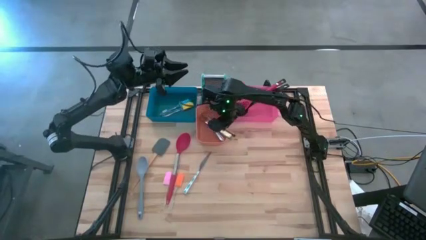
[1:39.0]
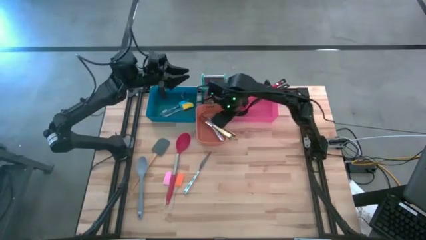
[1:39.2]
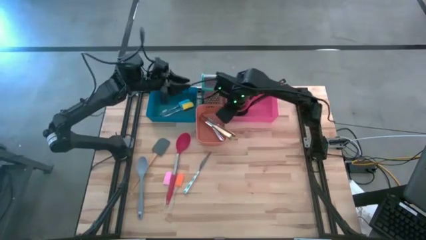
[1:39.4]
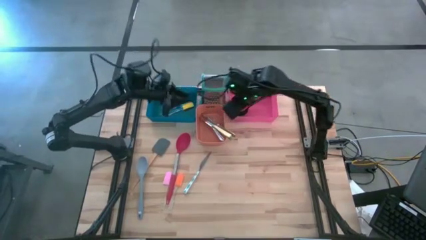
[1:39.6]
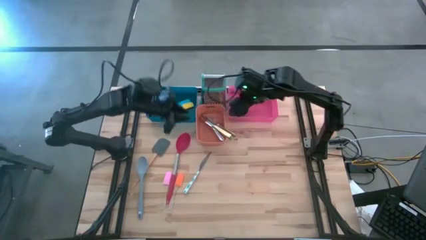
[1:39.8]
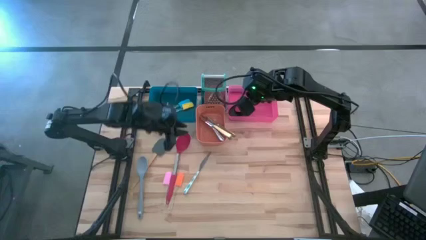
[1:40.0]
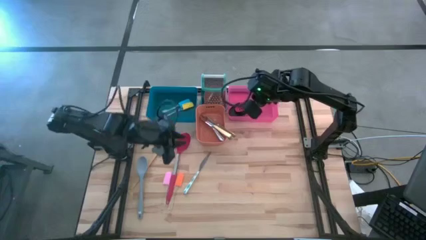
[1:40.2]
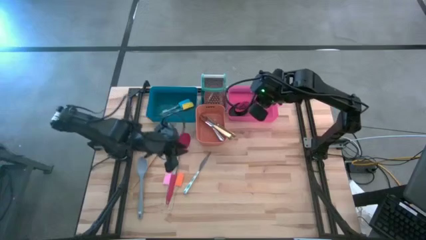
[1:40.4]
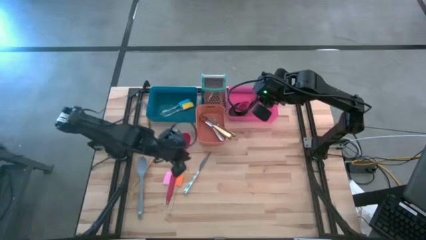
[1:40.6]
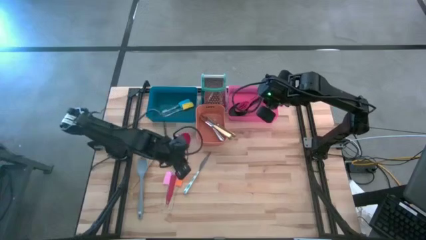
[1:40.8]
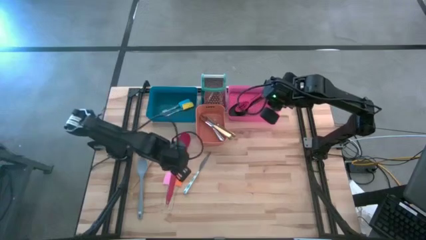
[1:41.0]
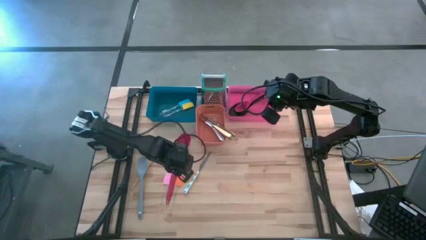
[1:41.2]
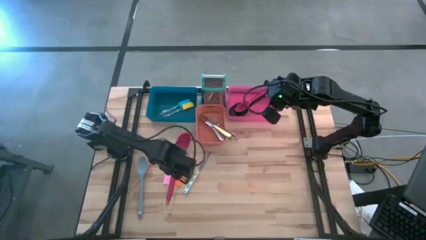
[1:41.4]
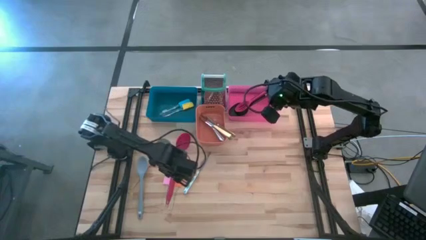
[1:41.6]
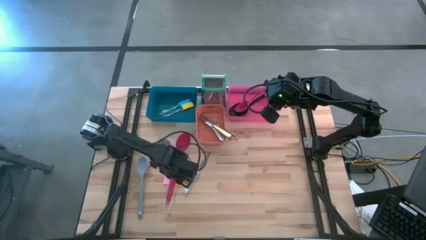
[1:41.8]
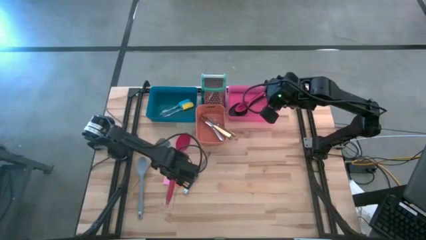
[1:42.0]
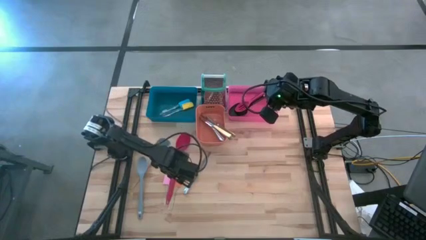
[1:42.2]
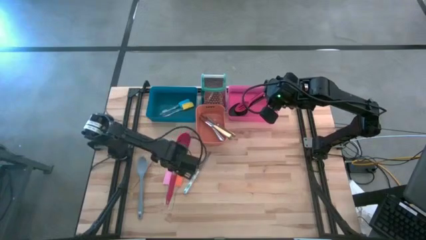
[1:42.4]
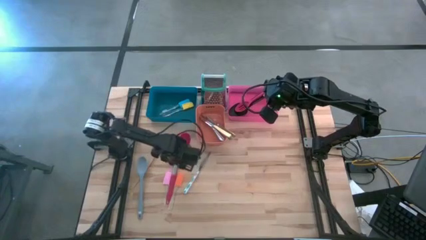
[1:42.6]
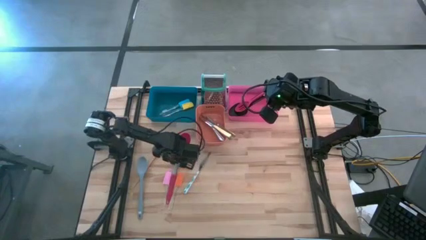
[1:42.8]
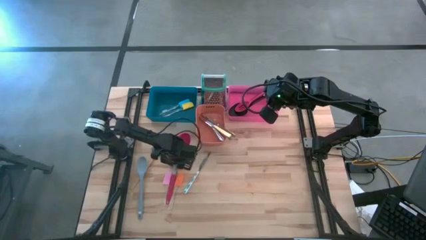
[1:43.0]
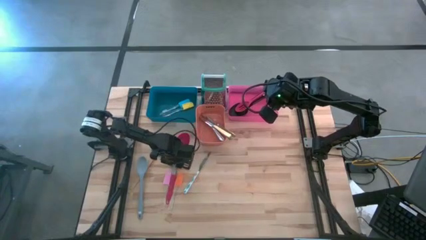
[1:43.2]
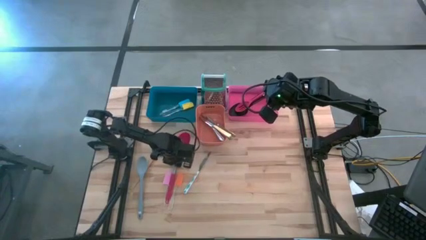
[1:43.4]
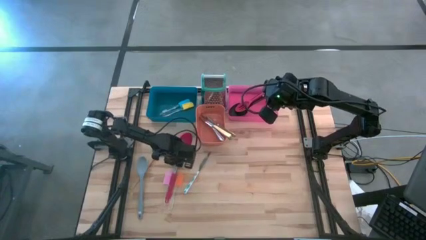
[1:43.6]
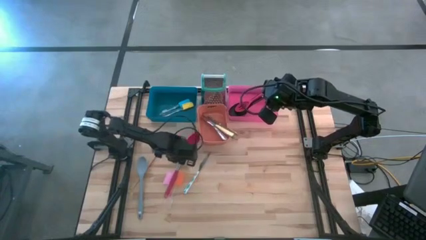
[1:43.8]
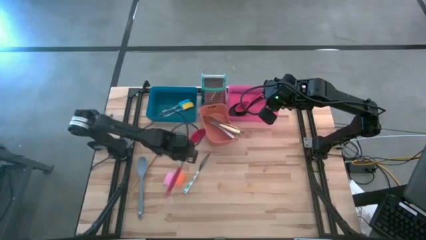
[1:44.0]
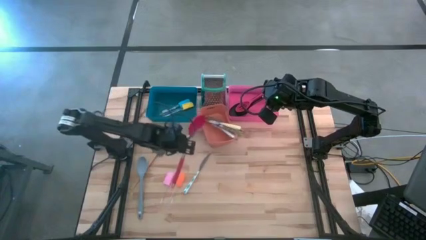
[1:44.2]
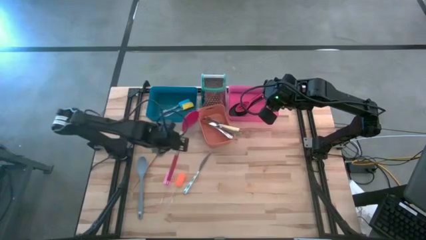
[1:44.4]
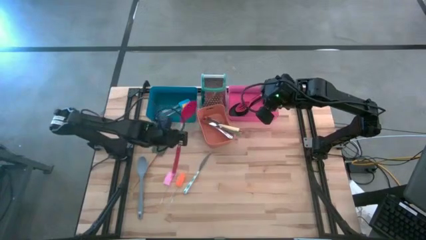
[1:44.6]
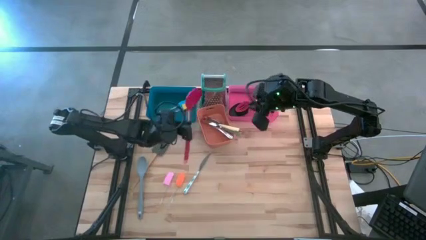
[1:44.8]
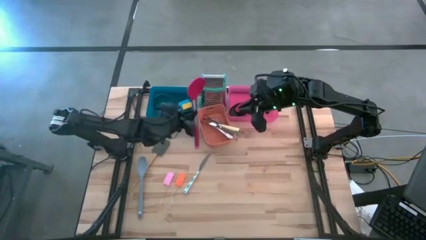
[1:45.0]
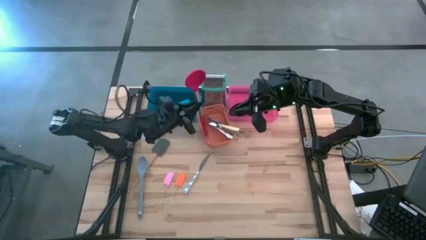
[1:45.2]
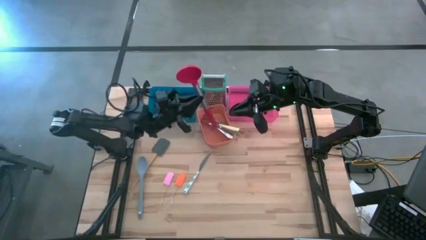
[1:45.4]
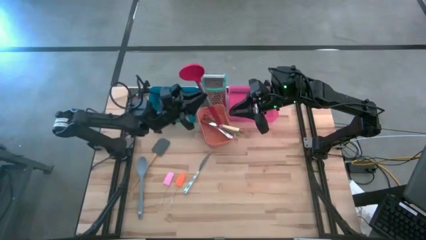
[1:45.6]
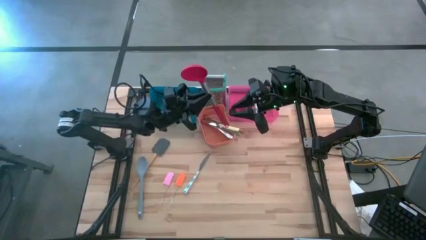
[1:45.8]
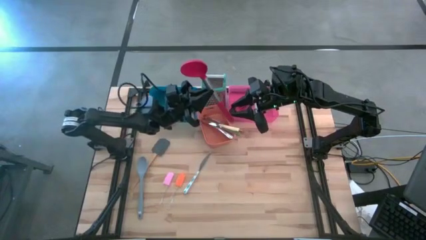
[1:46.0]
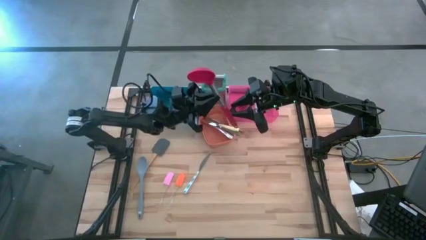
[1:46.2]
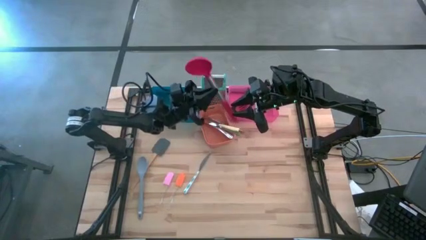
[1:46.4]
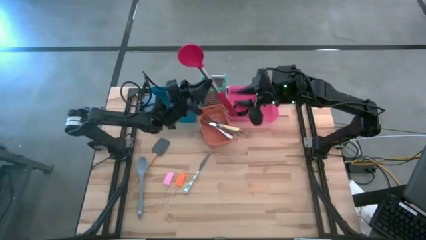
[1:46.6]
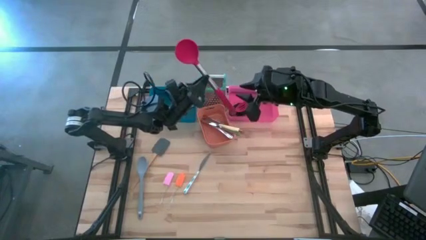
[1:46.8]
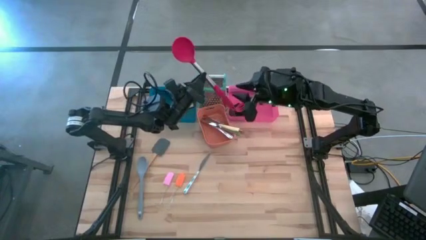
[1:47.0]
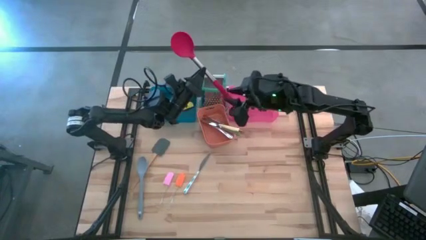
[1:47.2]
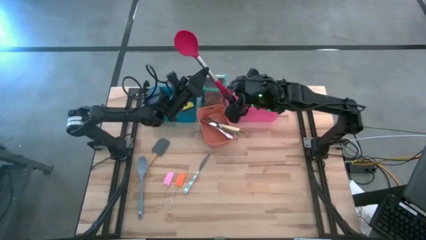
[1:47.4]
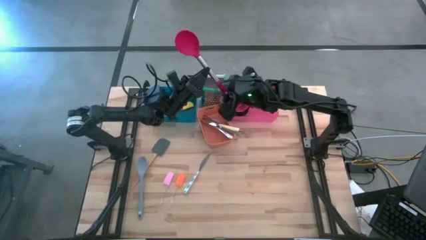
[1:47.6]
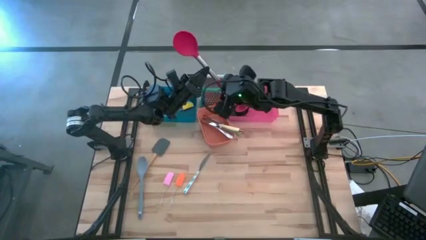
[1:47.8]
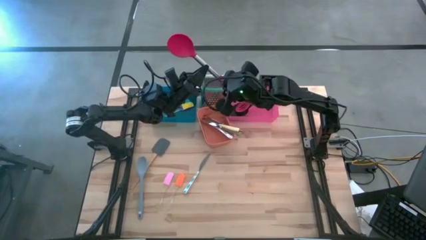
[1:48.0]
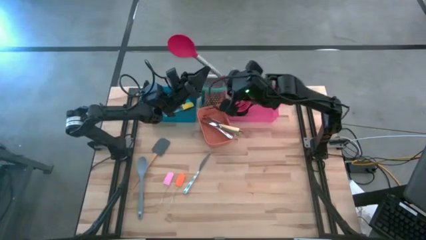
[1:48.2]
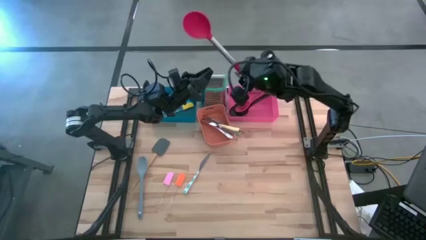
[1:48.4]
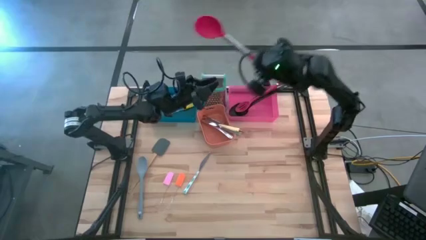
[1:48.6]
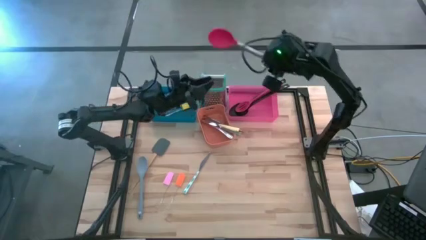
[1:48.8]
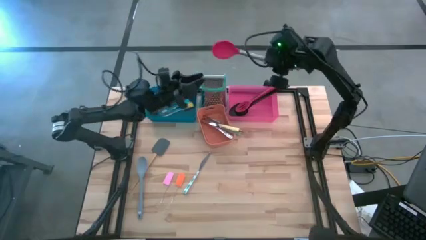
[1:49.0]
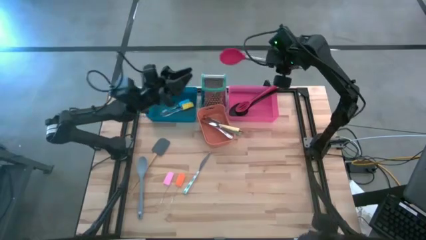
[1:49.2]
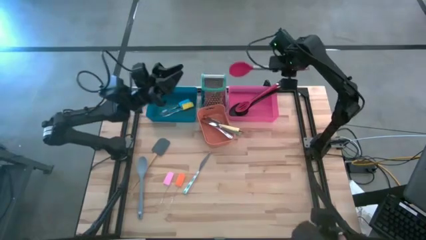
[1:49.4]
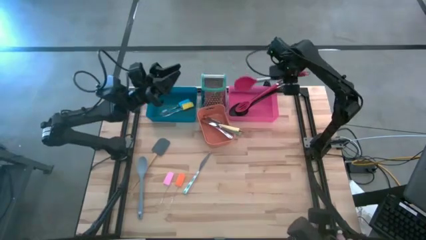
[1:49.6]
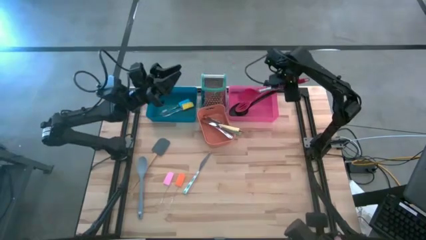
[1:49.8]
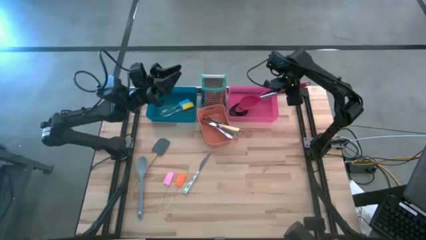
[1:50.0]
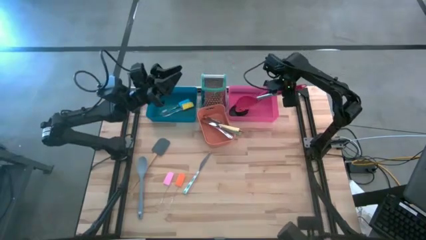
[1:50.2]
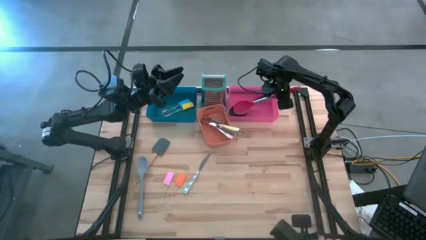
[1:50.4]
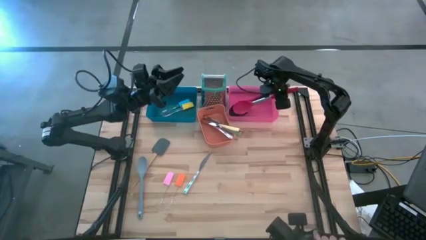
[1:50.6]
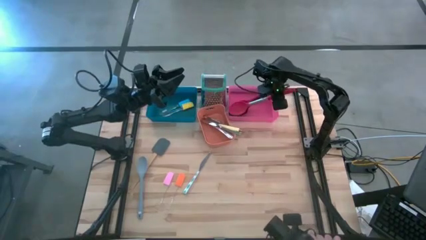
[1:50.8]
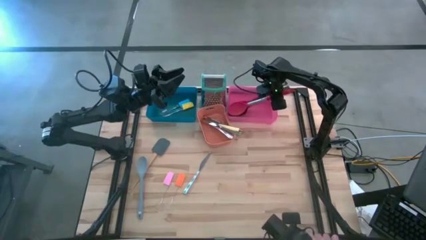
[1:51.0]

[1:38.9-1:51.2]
Task: Pick & Place Kitchen Items
Put the red serving spoon into the pink bin
